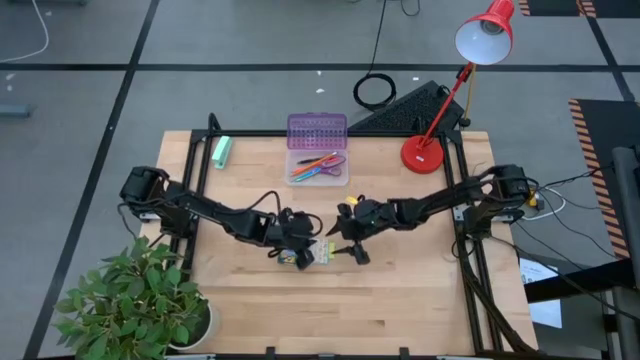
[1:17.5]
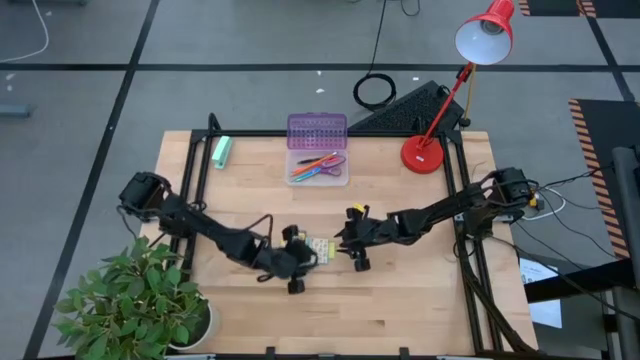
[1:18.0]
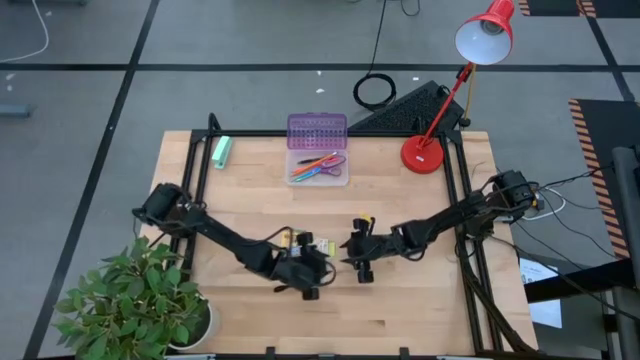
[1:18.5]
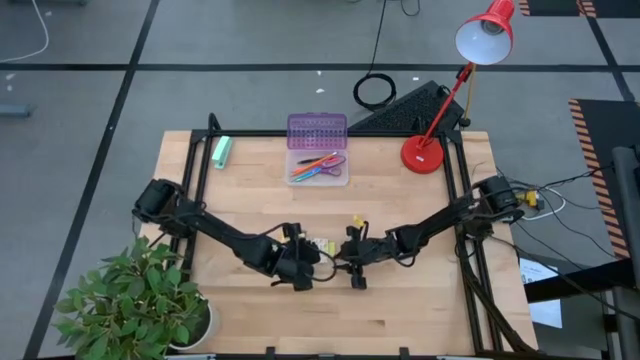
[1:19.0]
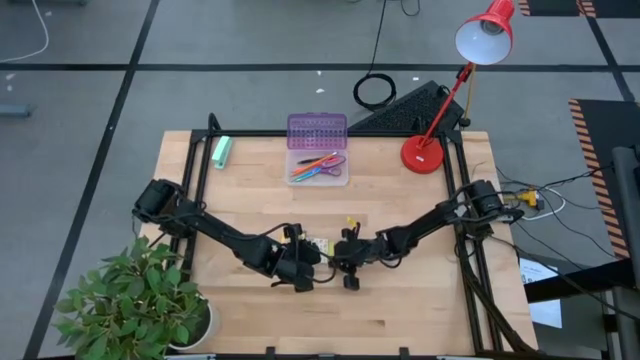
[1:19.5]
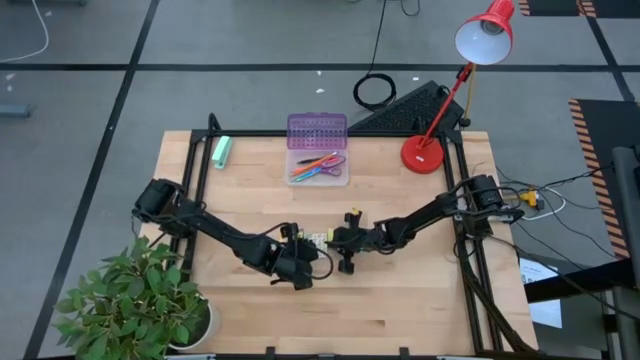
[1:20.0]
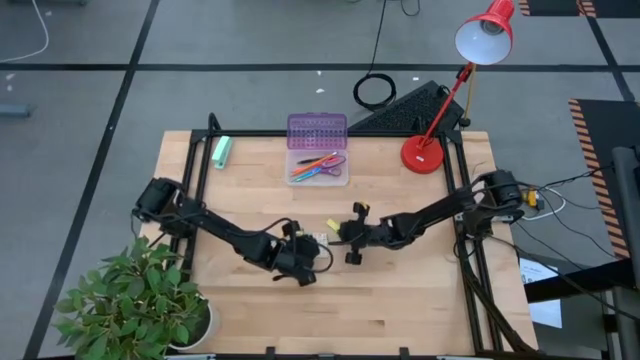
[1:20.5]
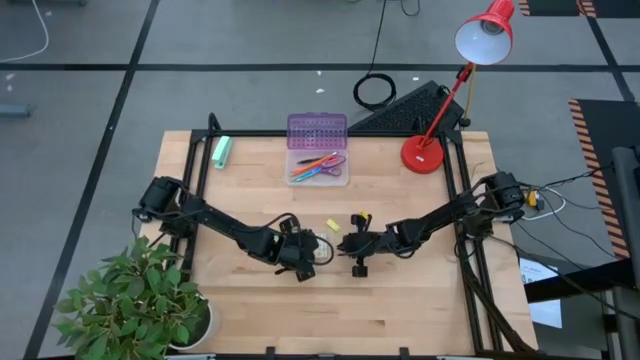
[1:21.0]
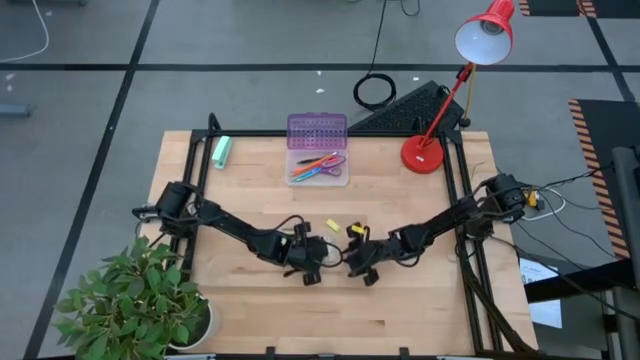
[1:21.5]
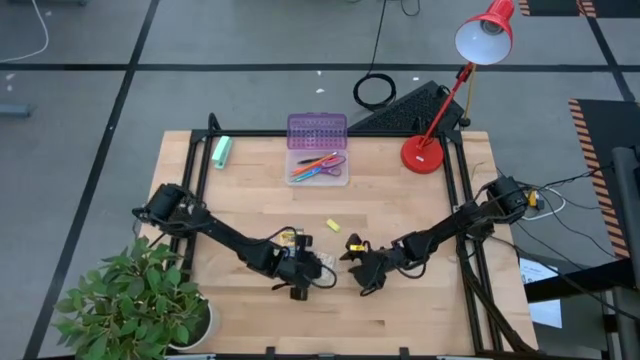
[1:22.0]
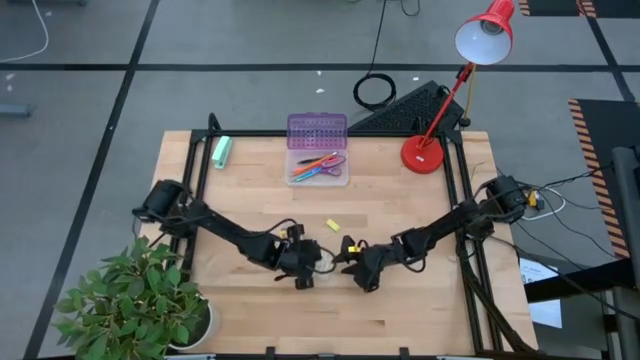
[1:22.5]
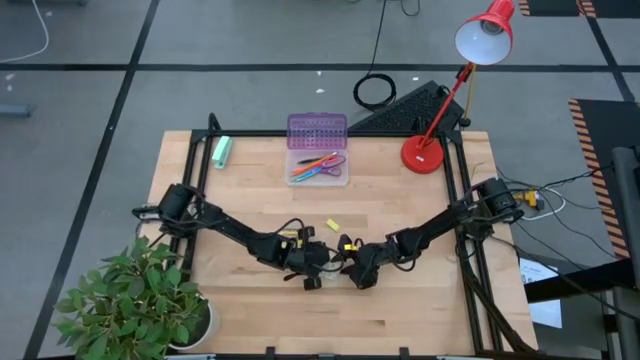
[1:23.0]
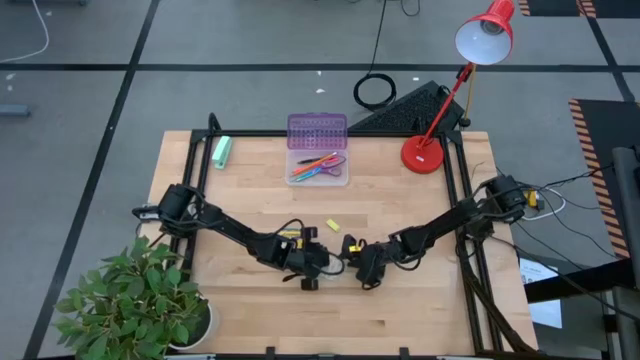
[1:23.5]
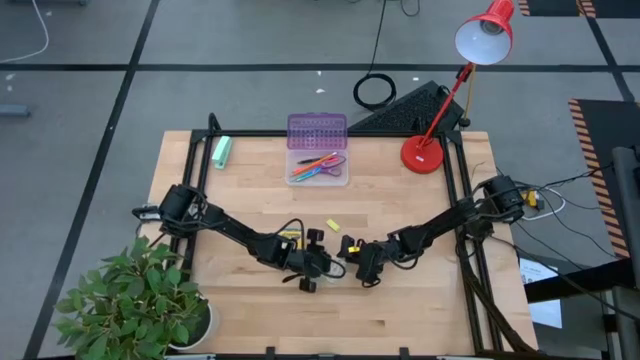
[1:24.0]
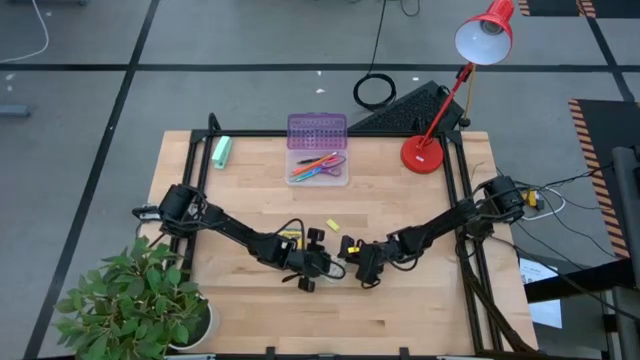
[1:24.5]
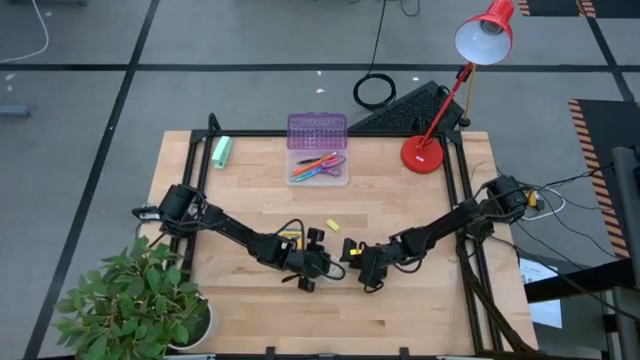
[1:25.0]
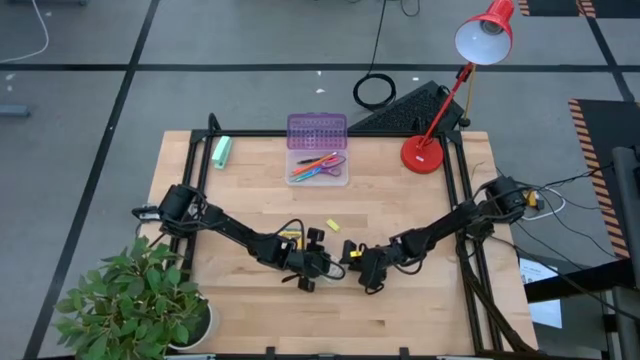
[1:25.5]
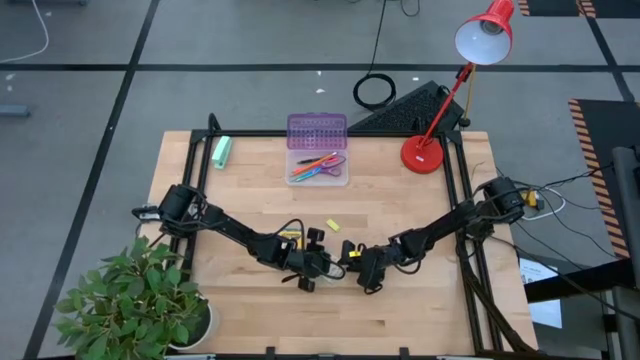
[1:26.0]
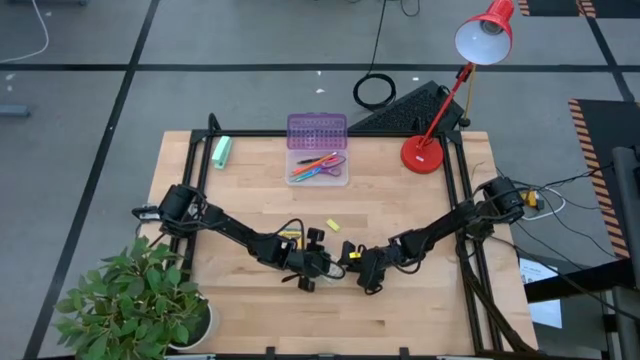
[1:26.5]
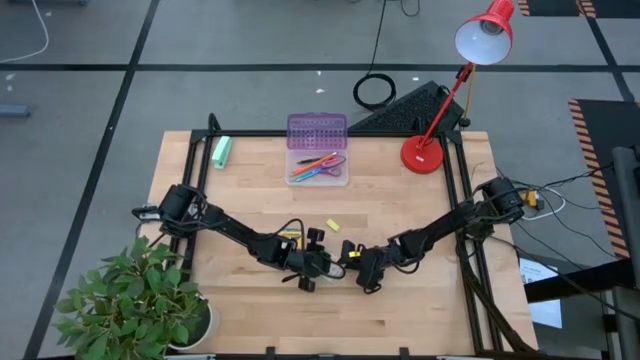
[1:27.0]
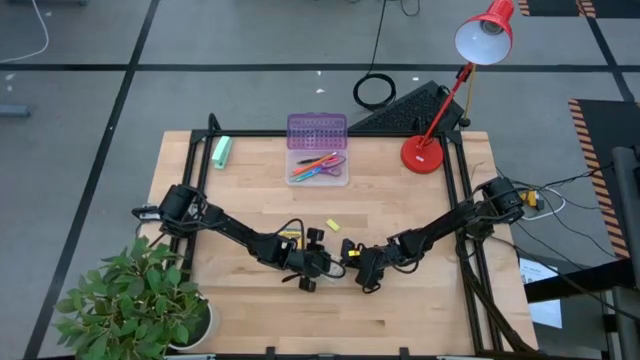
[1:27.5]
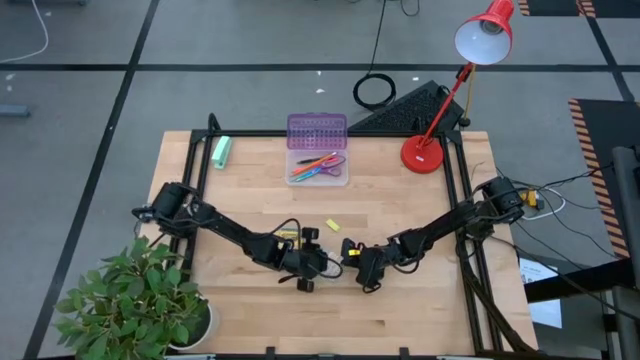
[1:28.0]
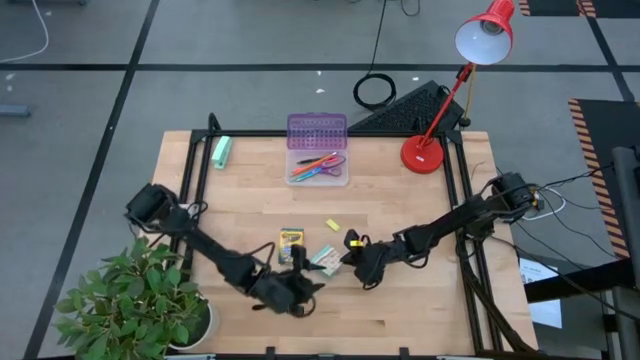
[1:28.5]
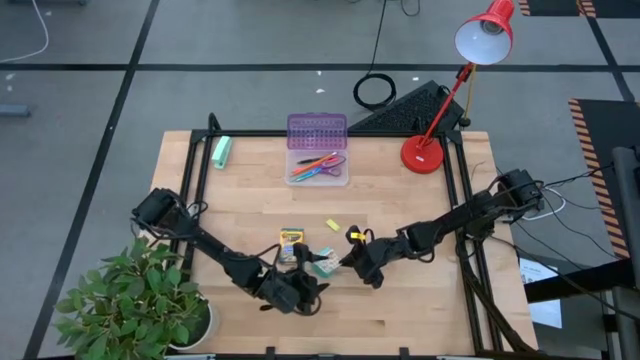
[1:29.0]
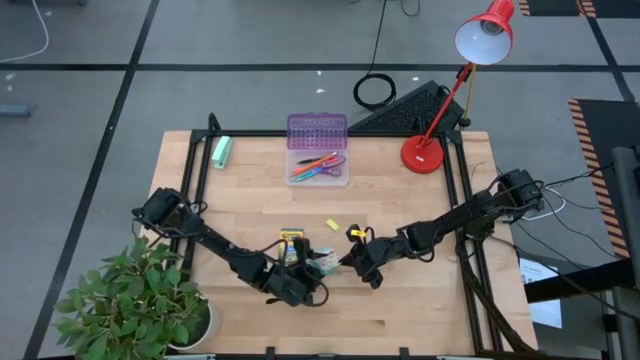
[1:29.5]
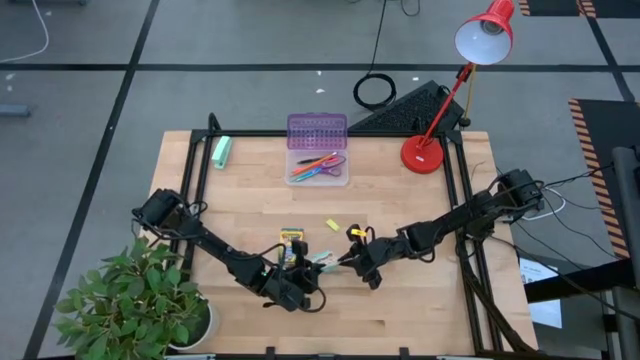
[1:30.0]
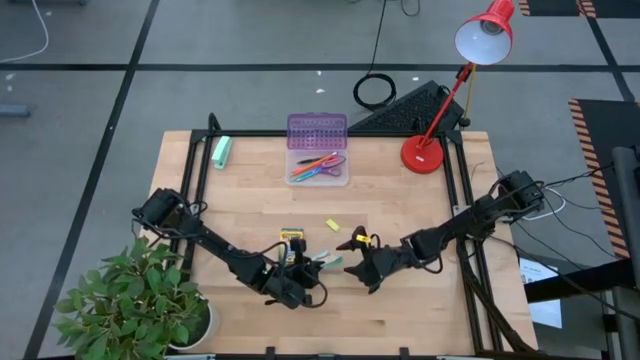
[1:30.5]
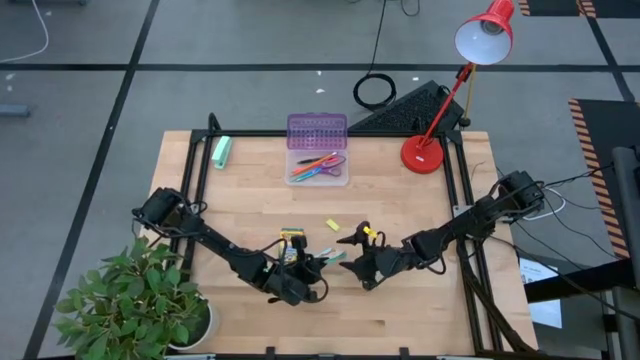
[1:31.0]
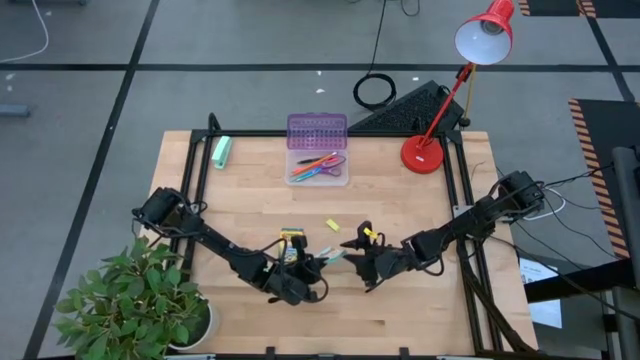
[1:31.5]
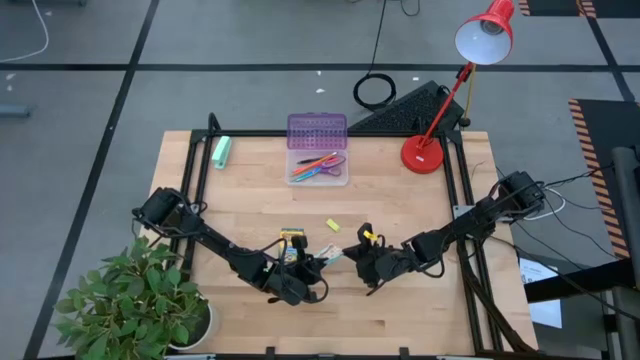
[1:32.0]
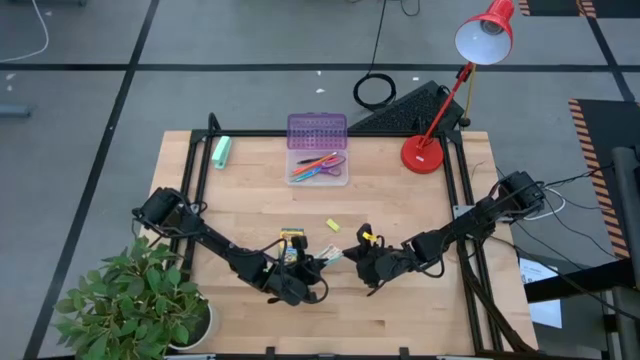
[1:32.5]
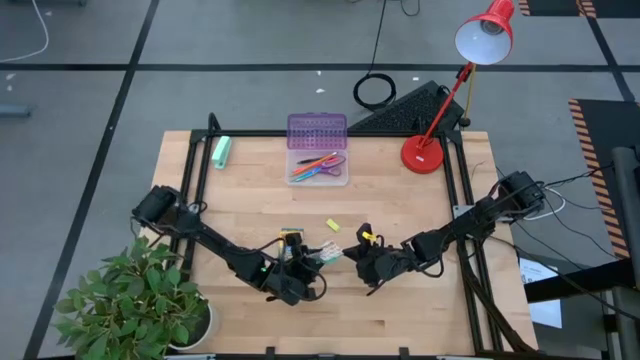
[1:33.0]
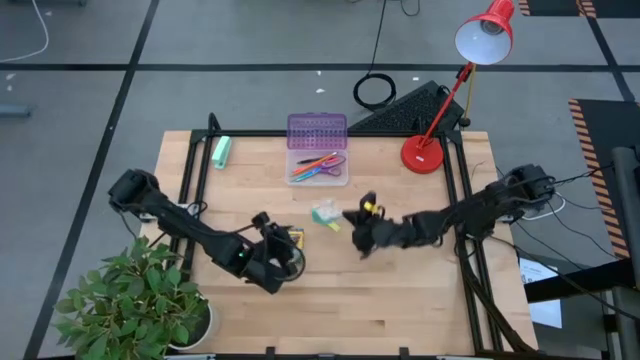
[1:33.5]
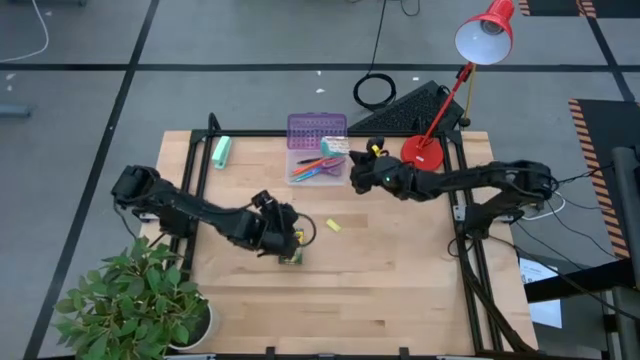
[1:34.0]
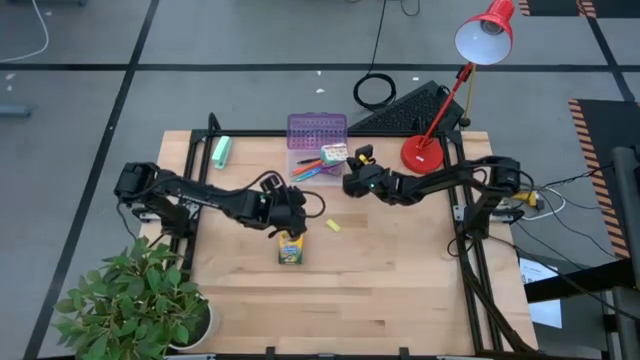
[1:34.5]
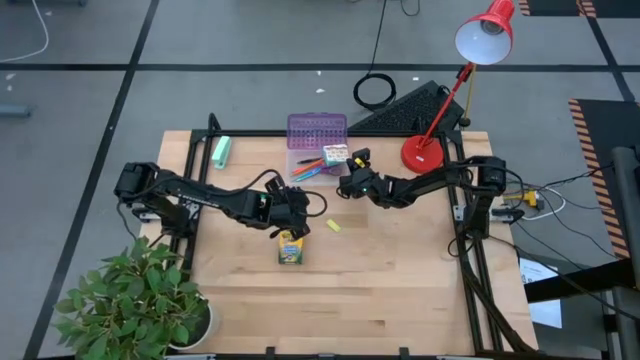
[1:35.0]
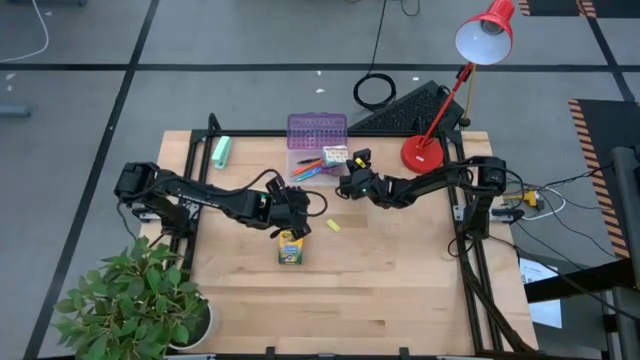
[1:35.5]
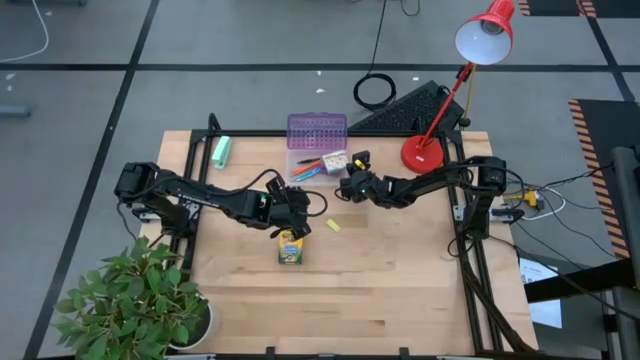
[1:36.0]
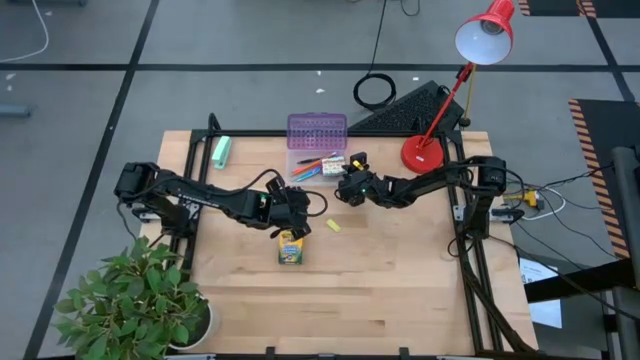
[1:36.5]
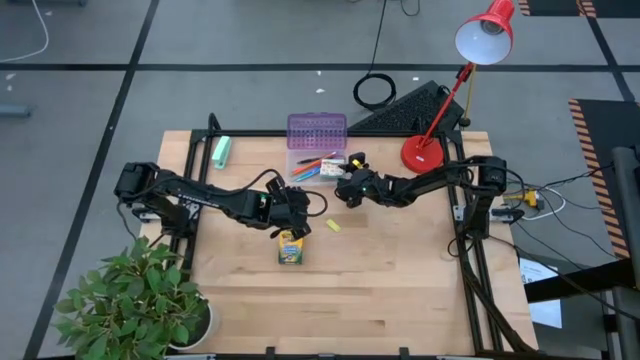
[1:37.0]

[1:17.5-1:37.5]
Task: Pack school essentials
Put the blue sticky notes into the purple supply box

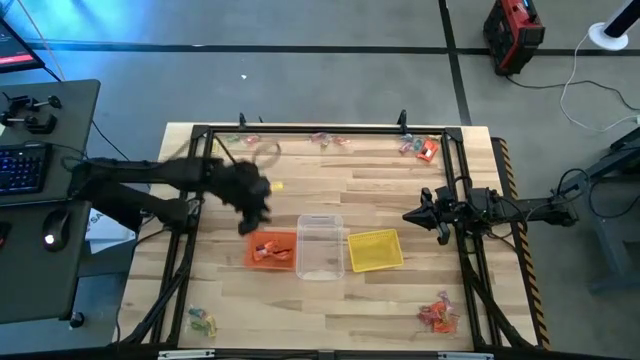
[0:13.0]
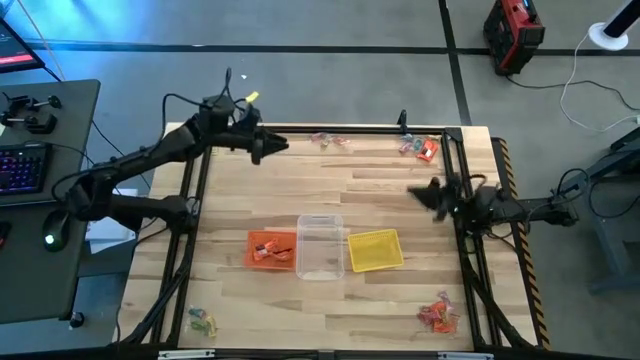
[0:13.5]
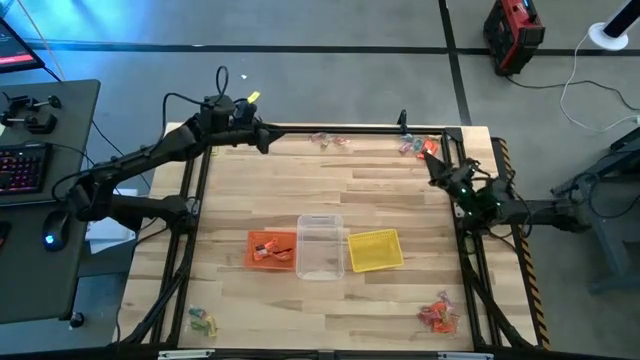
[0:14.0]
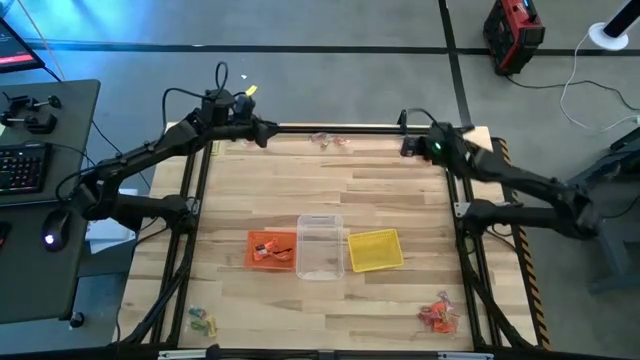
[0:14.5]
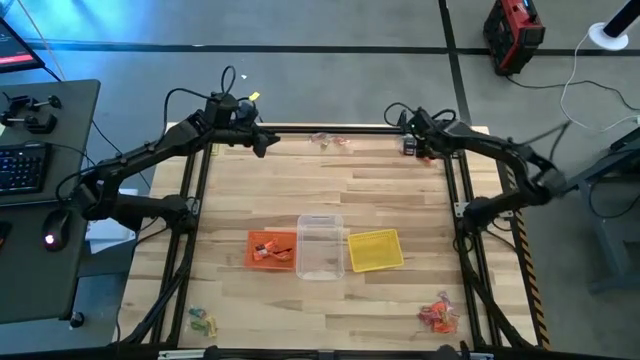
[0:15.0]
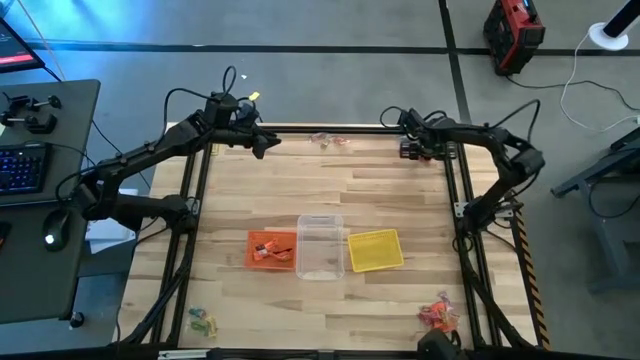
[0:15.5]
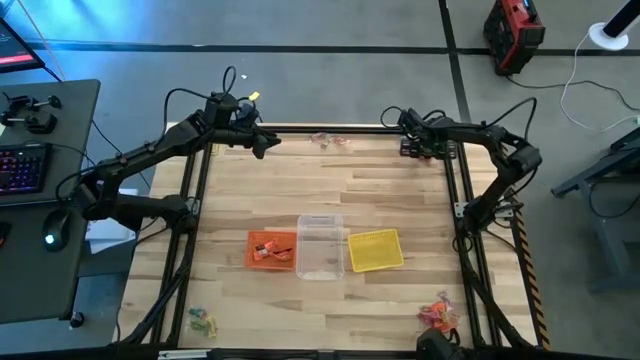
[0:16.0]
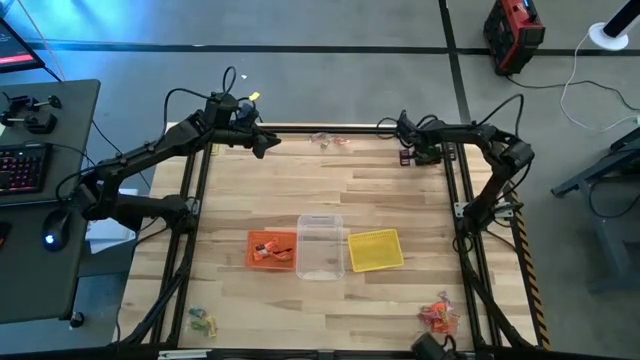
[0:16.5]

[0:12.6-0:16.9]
Task: Sort candy by brand, put in halloween buckets
Put the orange chocolate bar into the orange bin
